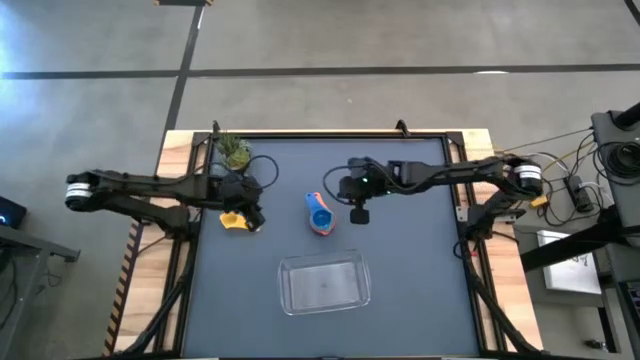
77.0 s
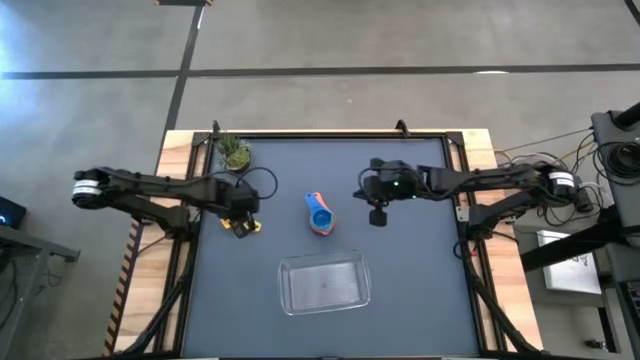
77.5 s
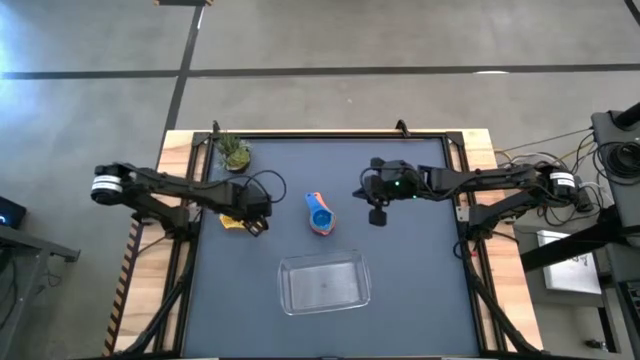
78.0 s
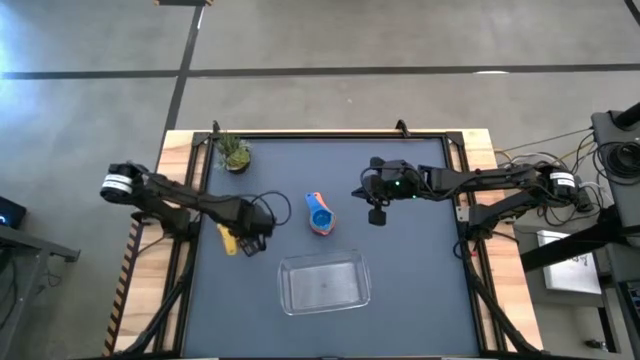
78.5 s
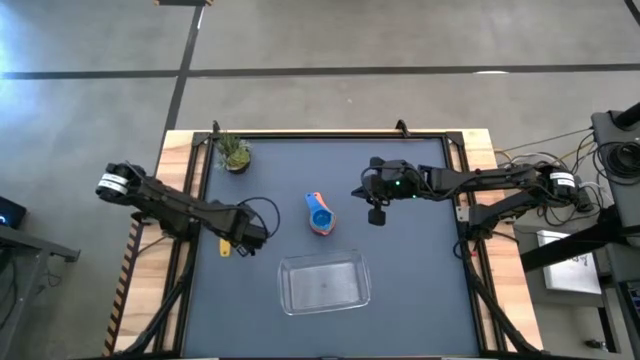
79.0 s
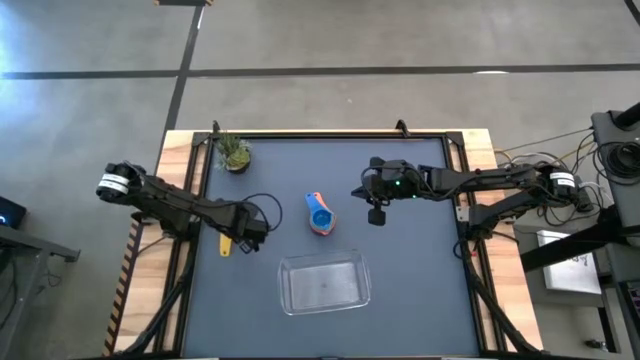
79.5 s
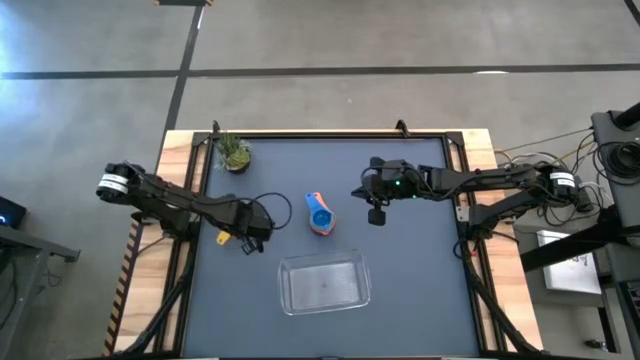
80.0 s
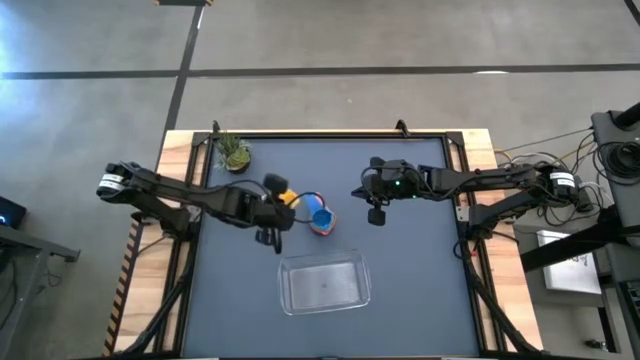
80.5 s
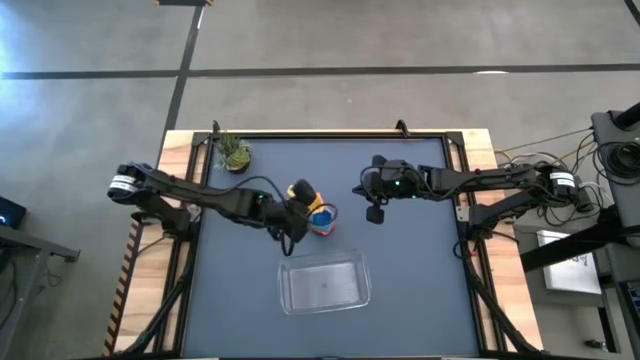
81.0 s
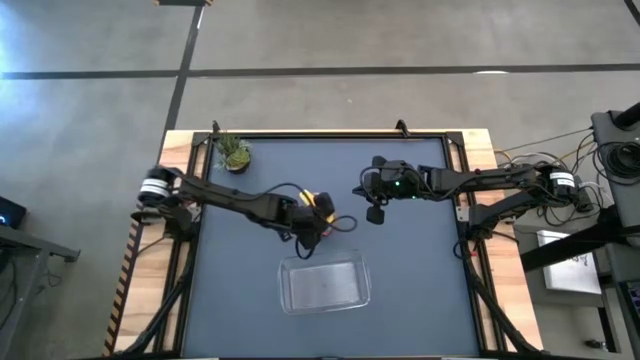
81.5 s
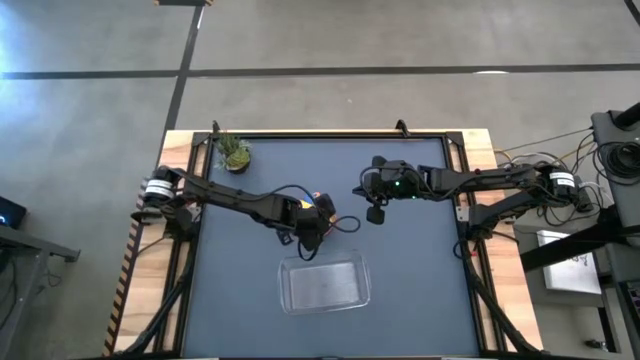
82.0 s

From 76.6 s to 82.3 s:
Task: Nest measuring cups in basket
Stack the yellow measuring cup on top of the blue measuring cup

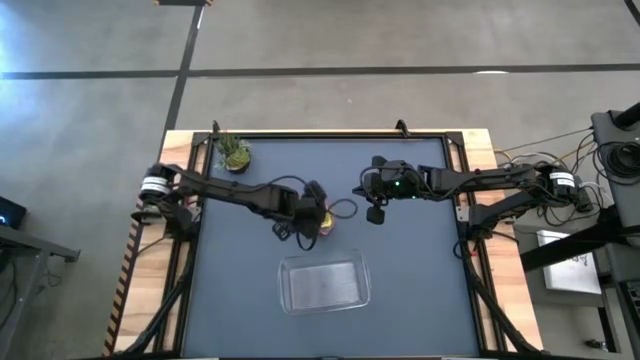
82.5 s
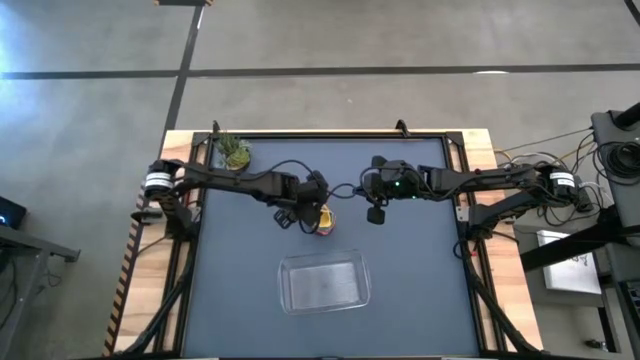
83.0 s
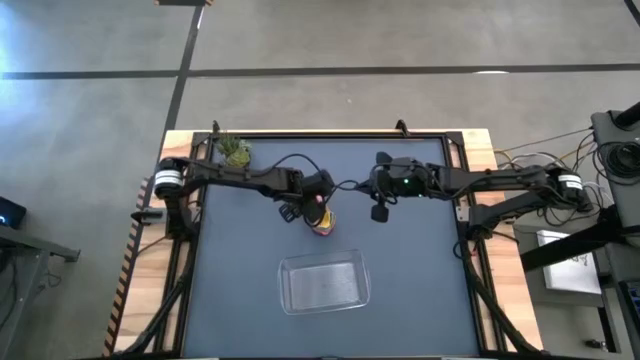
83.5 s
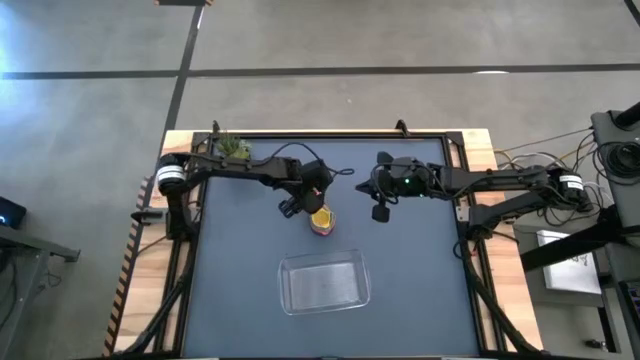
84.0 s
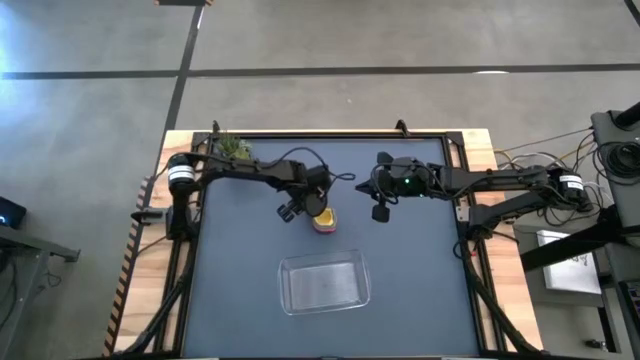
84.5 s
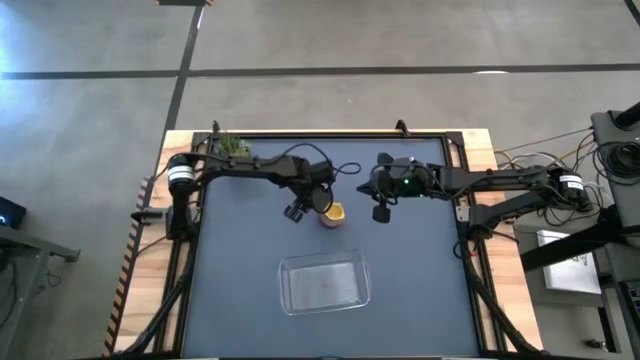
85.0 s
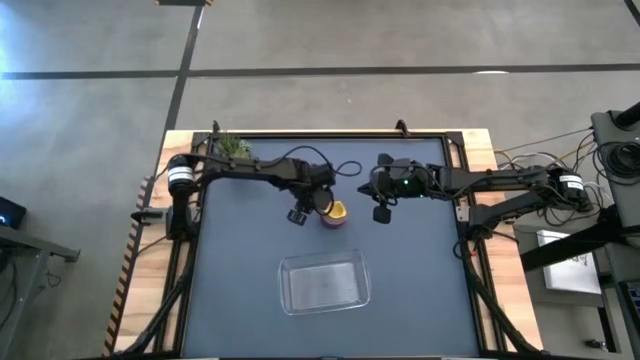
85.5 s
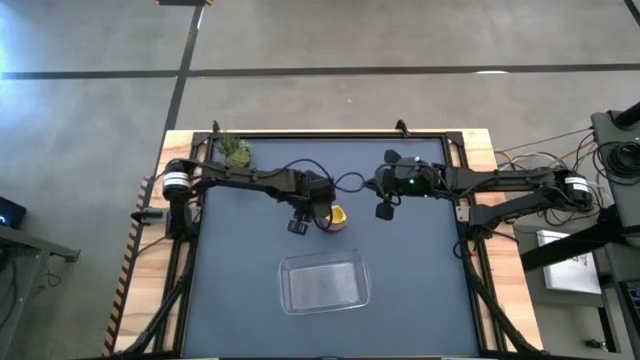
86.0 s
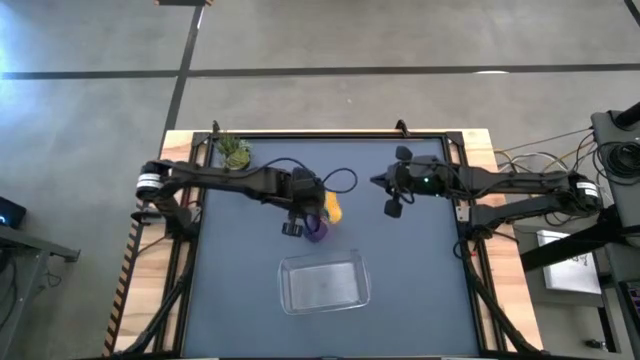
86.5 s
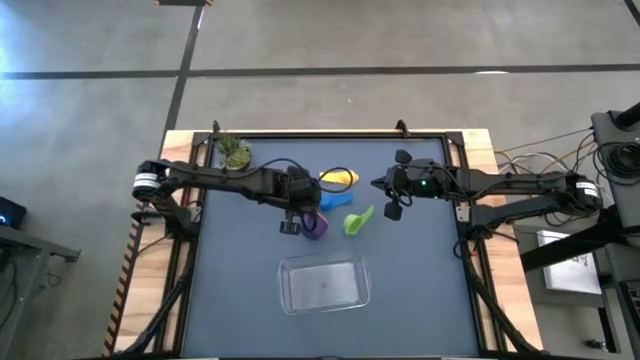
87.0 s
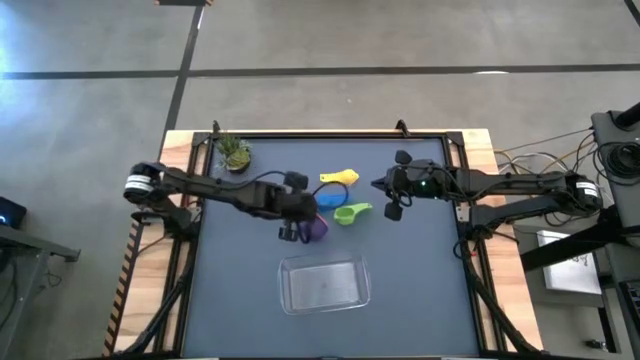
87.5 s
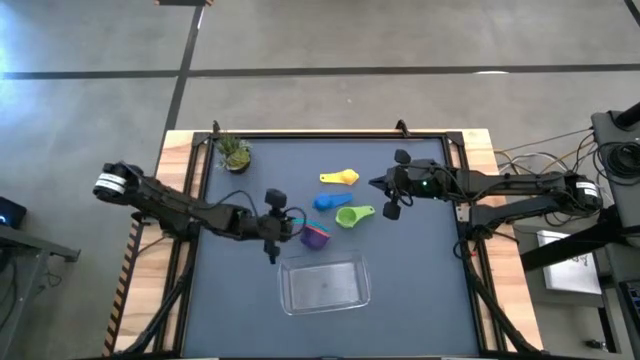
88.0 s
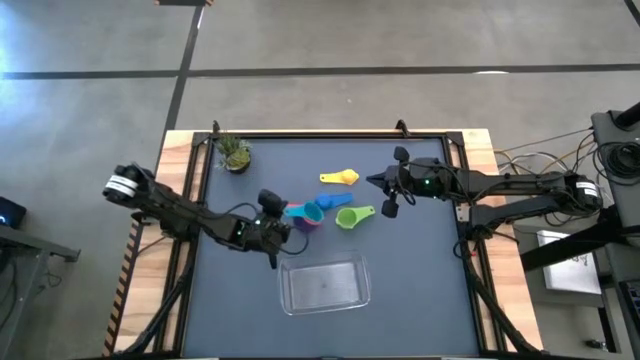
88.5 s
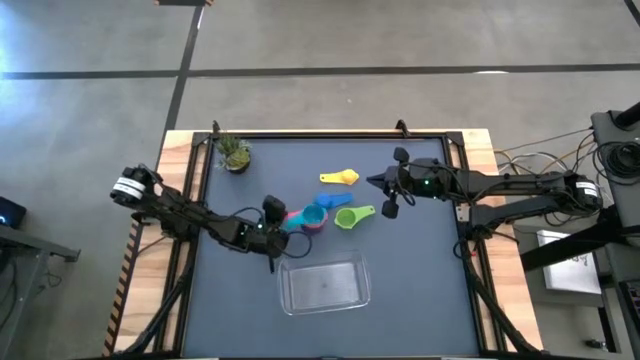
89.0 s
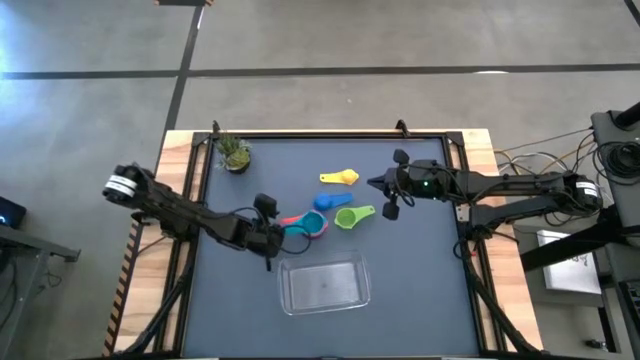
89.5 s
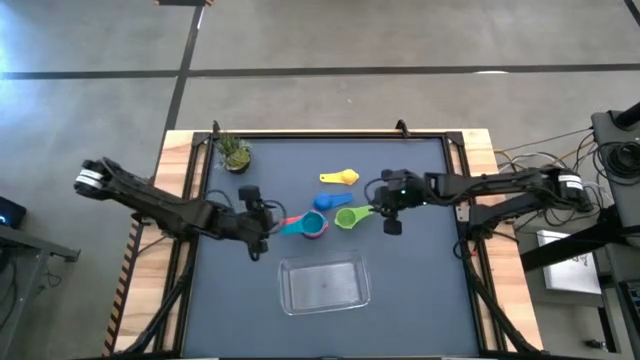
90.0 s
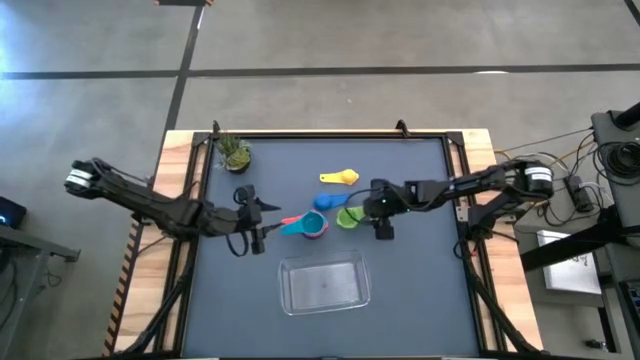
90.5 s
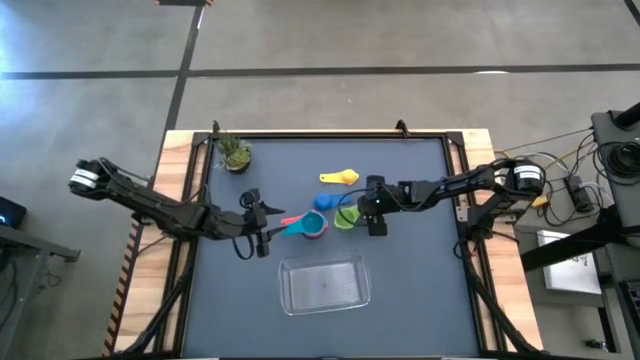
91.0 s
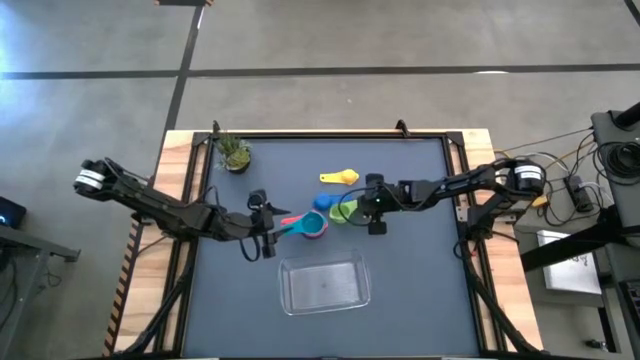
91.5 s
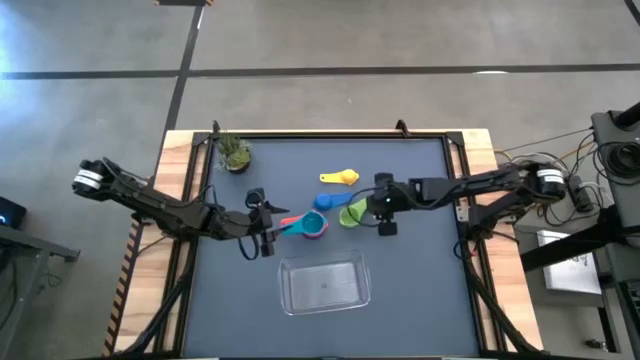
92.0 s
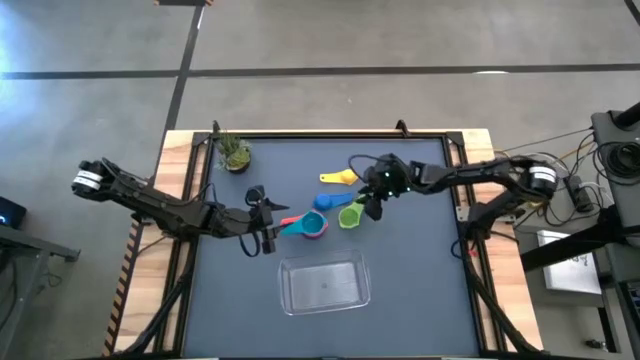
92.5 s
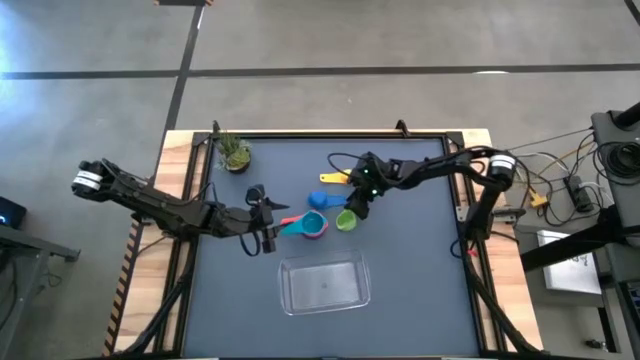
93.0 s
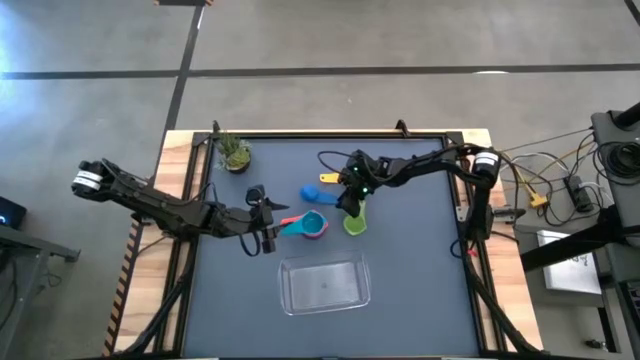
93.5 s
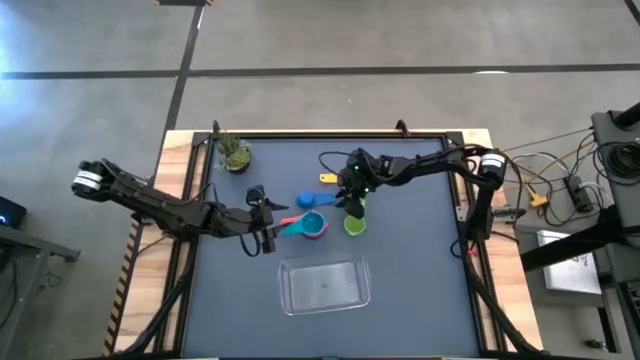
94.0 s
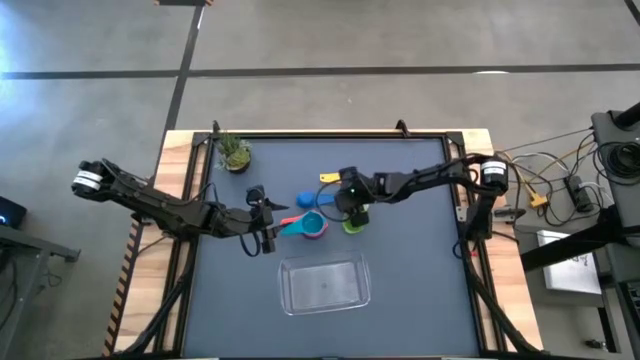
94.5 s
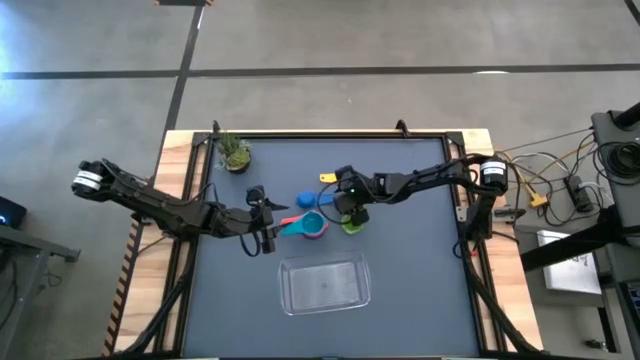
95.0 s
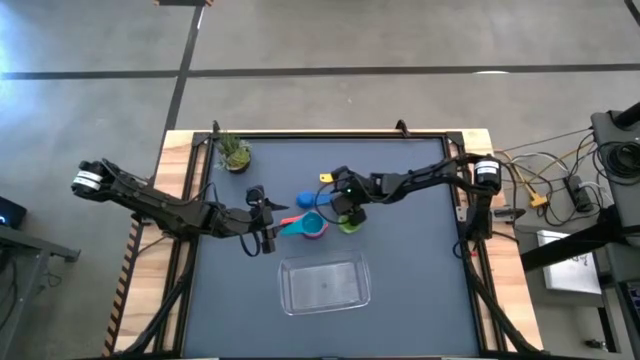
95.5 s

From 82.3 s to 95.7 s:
Put the nested measuring cups into the transparent bin

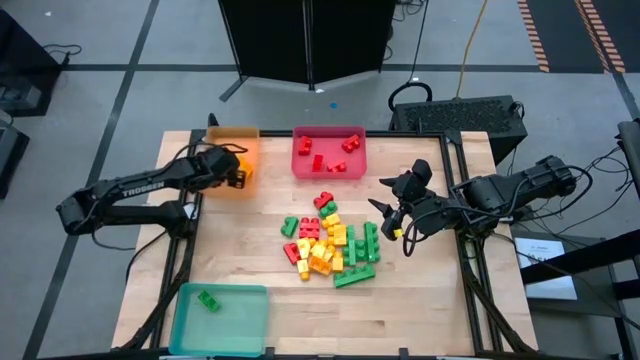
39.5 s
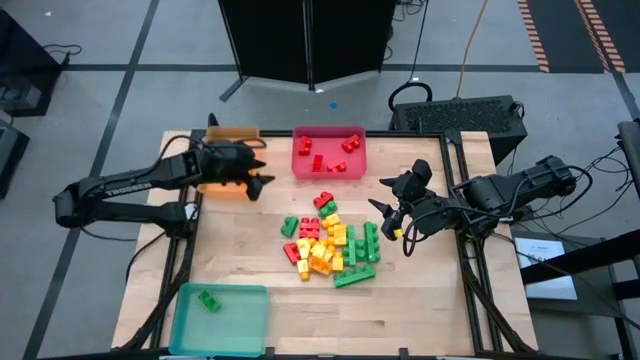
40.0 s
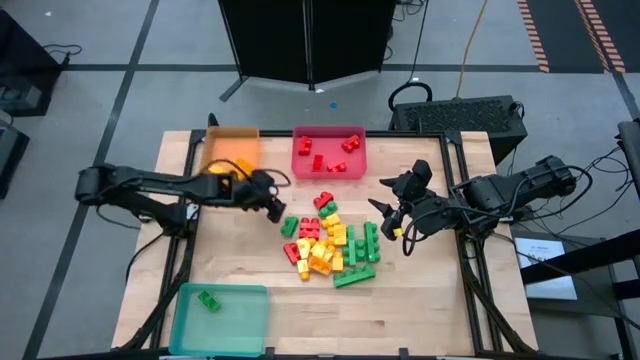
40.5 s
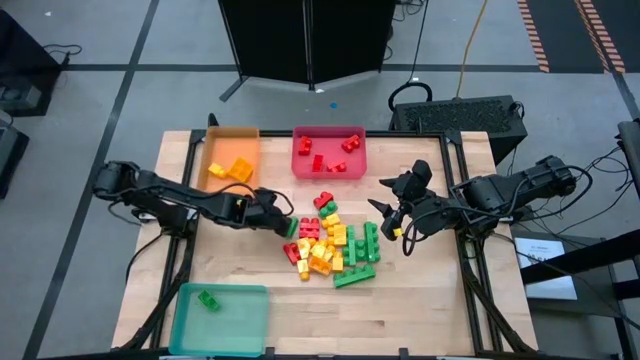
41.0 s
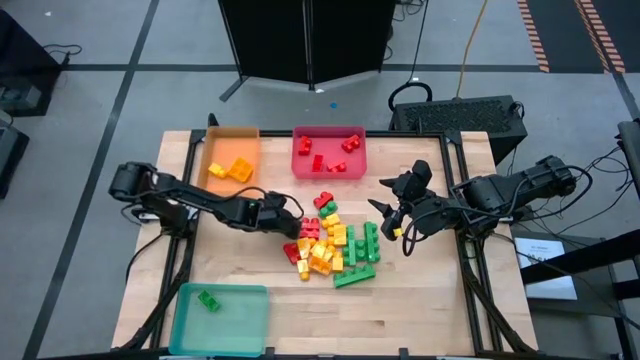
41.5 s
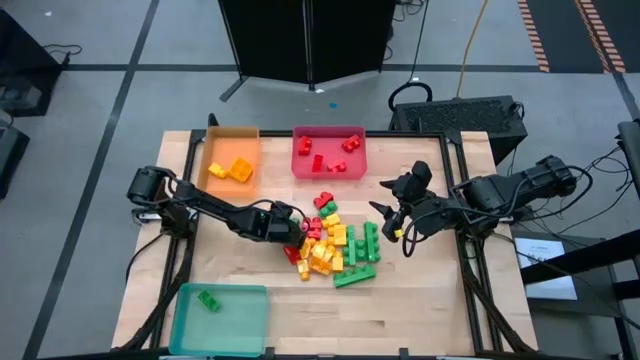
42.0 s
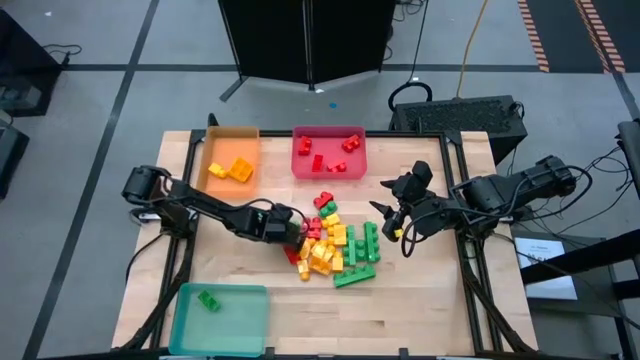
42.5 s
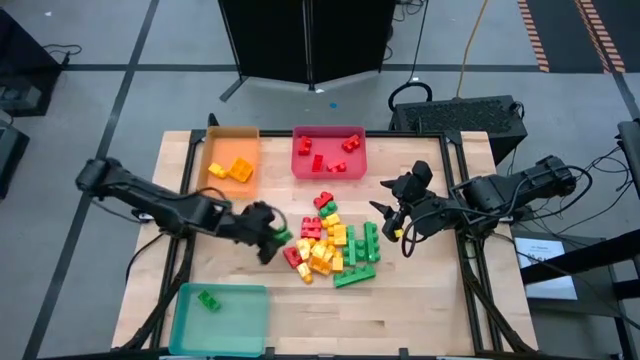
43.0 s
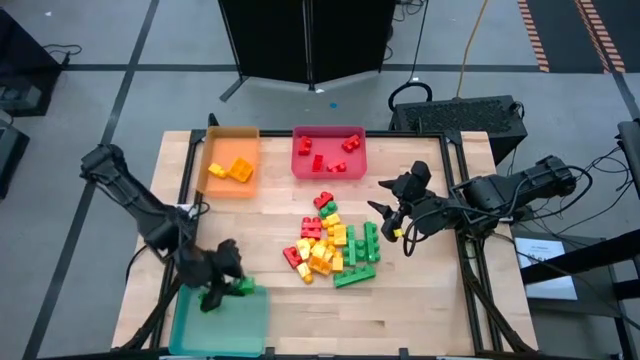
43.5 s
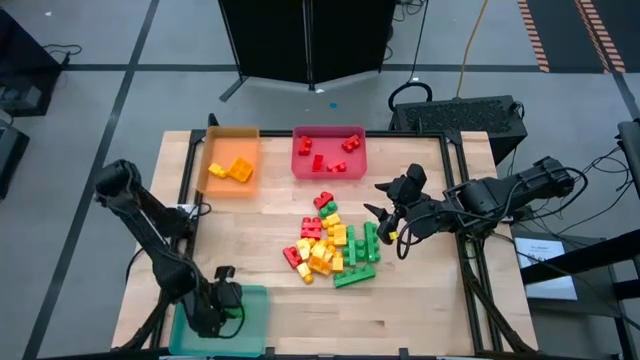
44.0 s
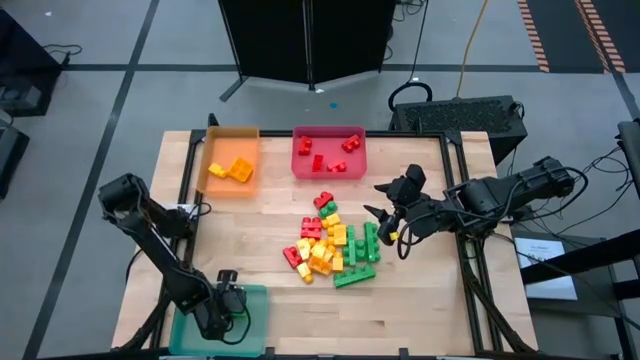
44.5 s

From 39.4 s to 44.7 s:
Task: Sort blocks
Put the green game piece into the blue bin
